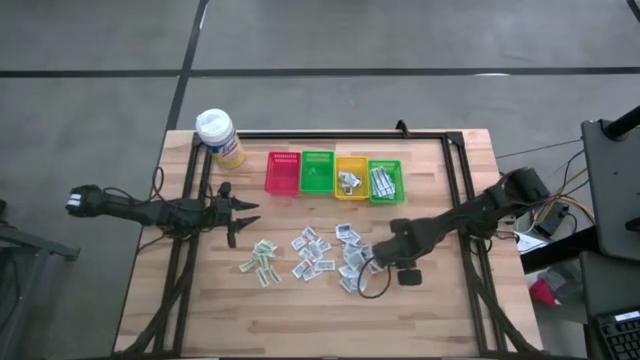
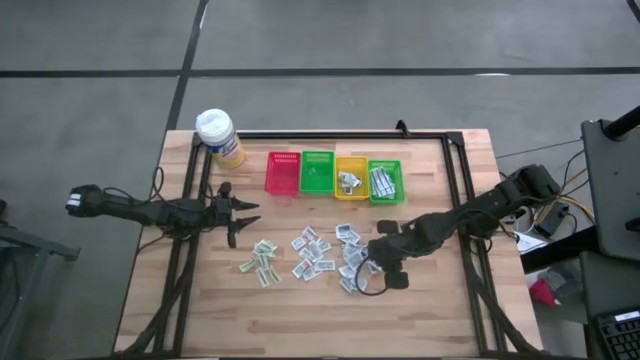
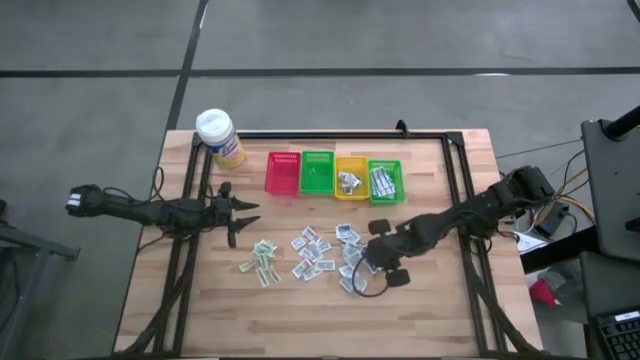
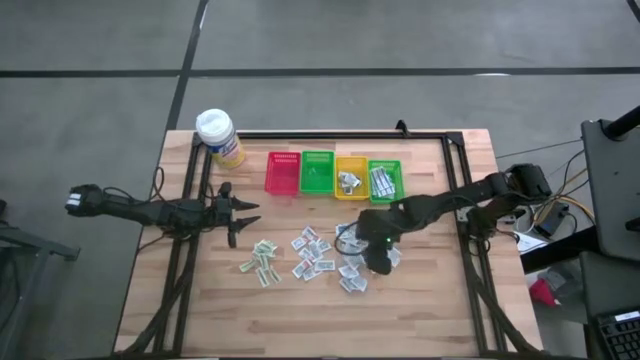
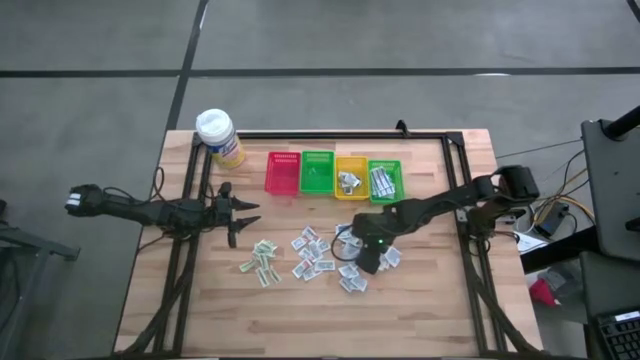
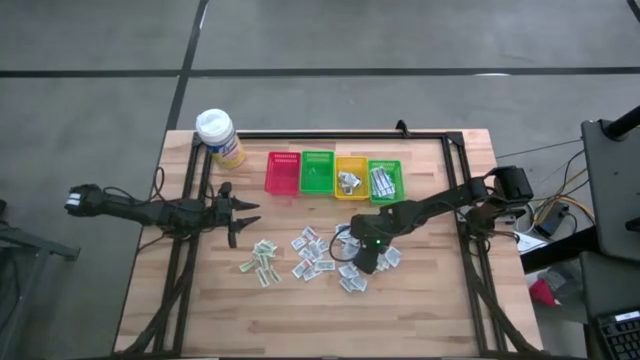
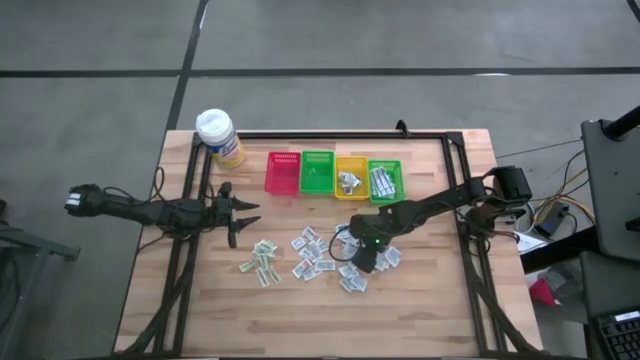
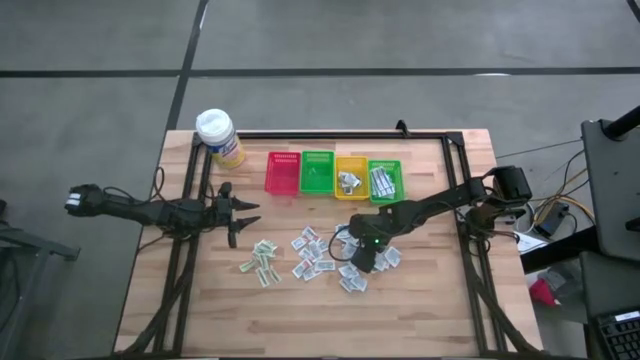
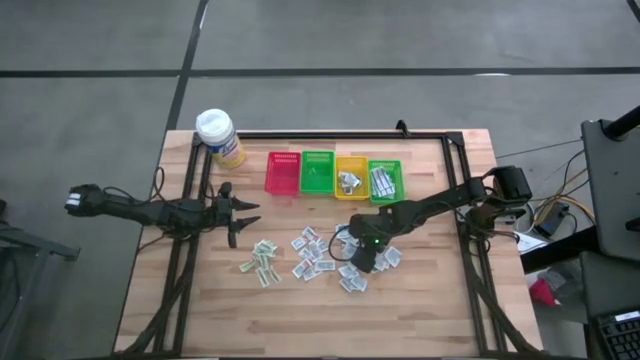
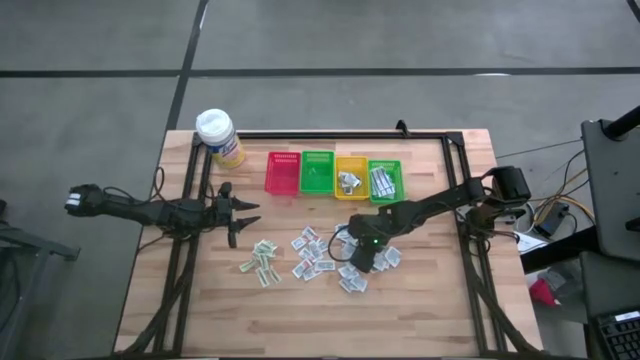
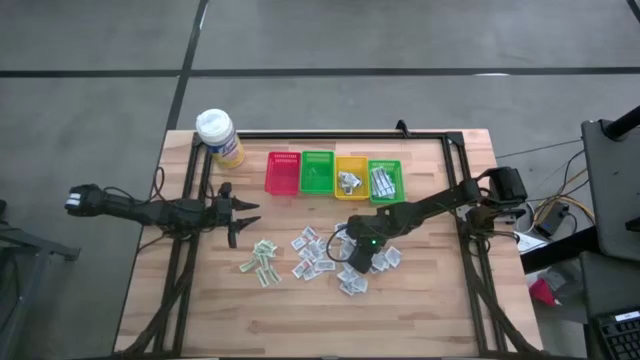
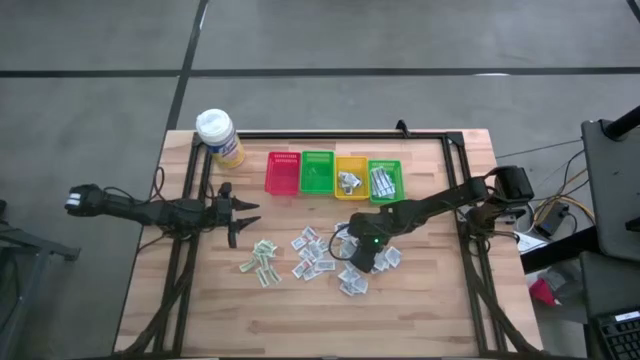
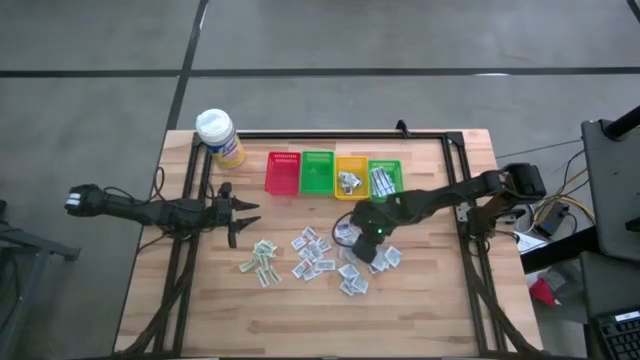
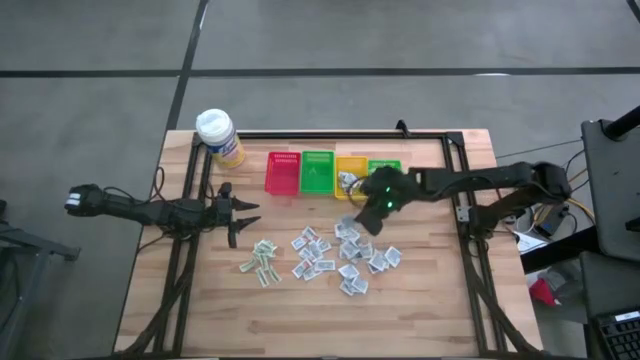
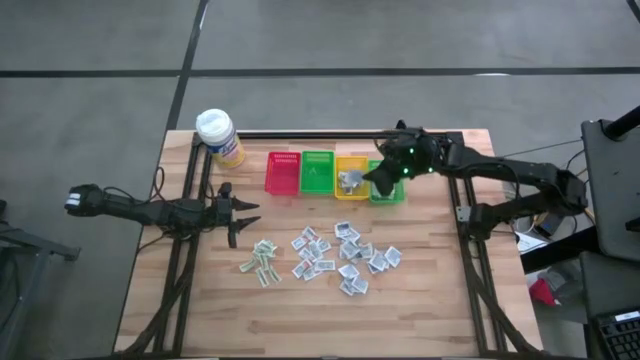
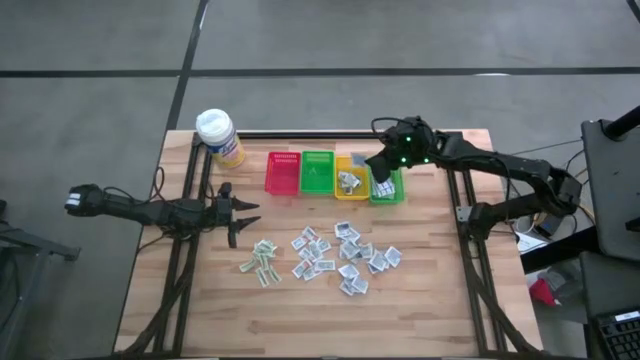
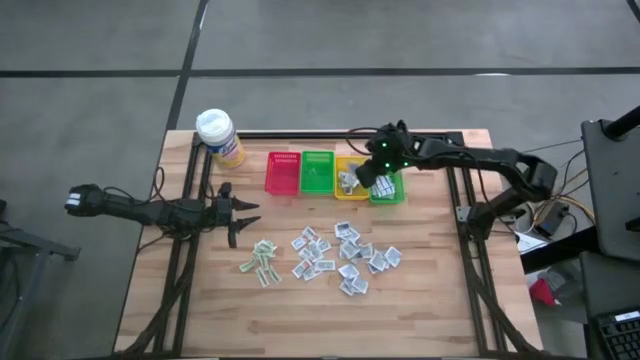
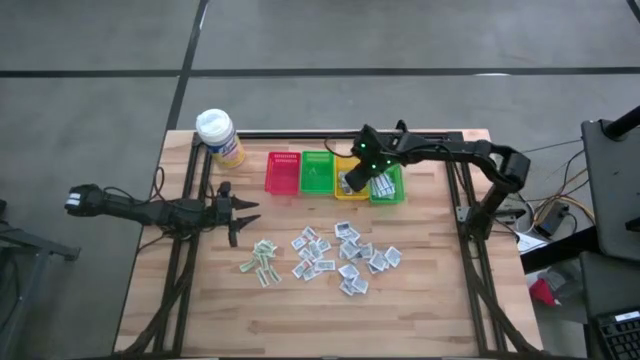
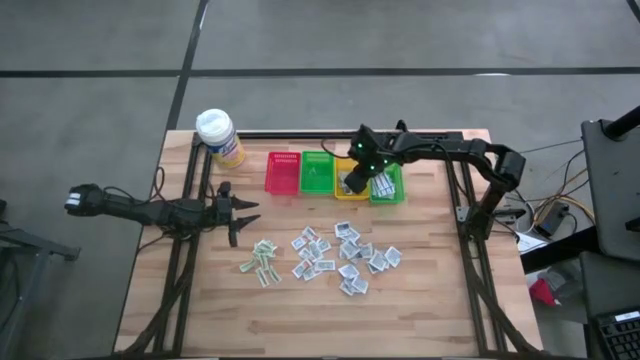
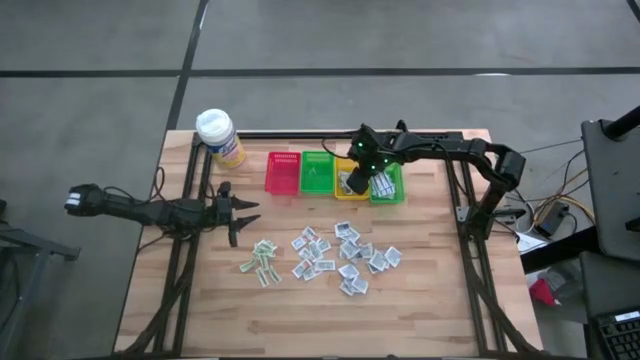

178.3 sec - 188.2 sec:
Task: Pick & Place First Aid Supplies
Put the blue alcohol pad into the yellow bin

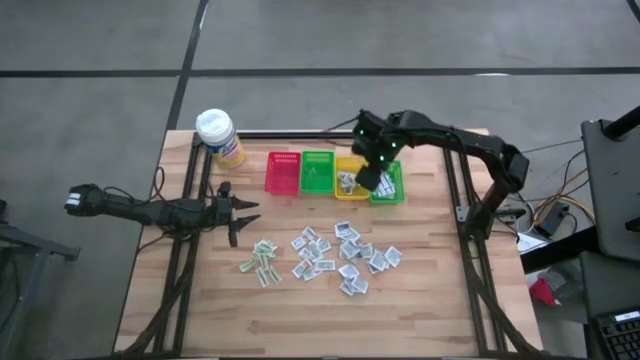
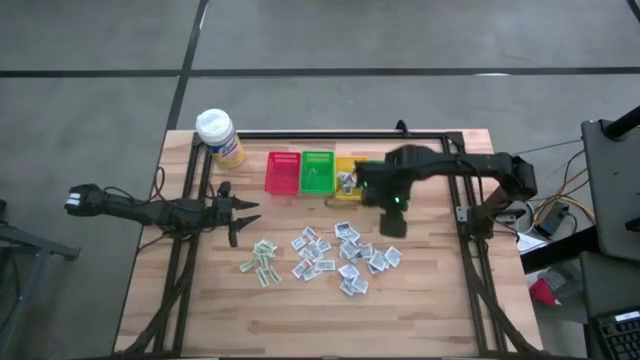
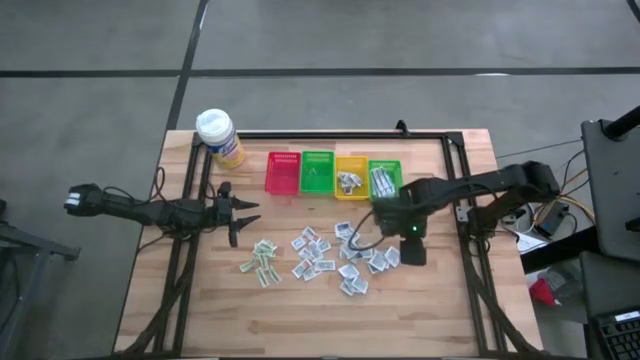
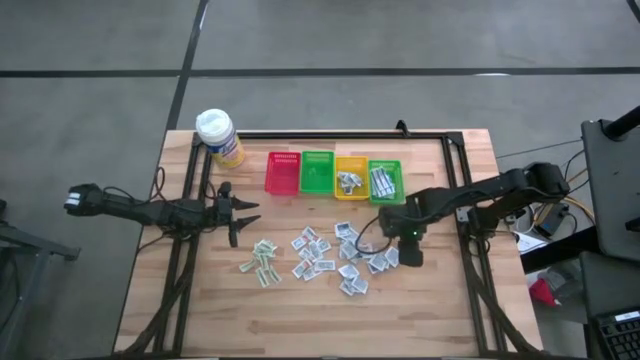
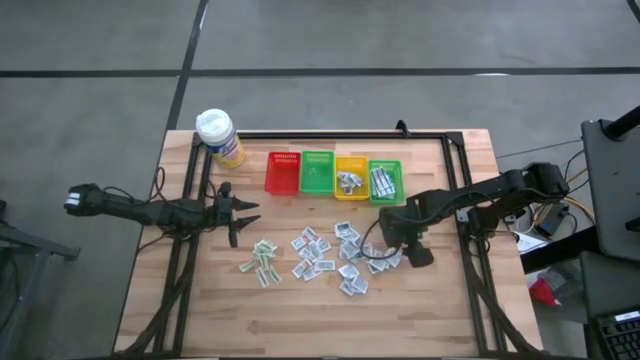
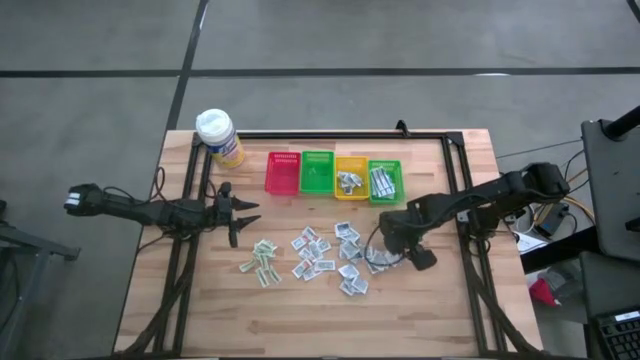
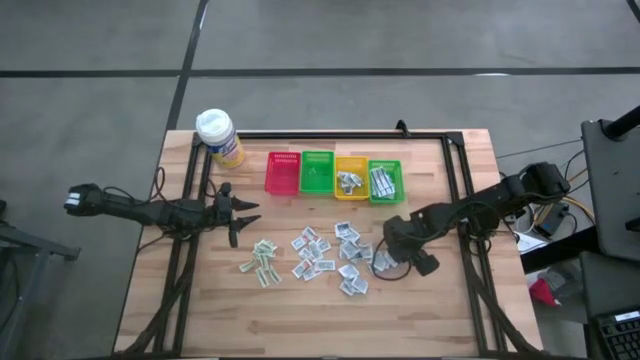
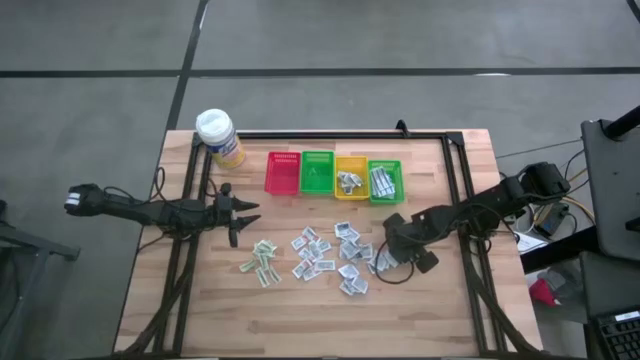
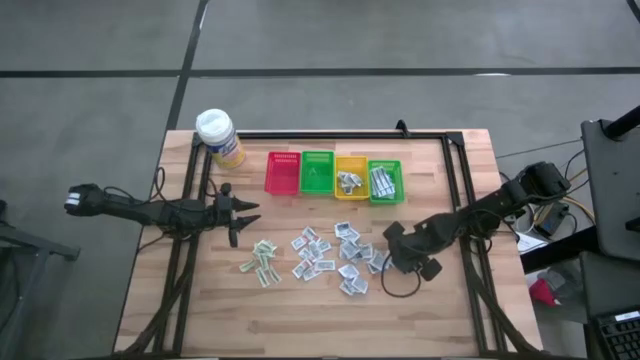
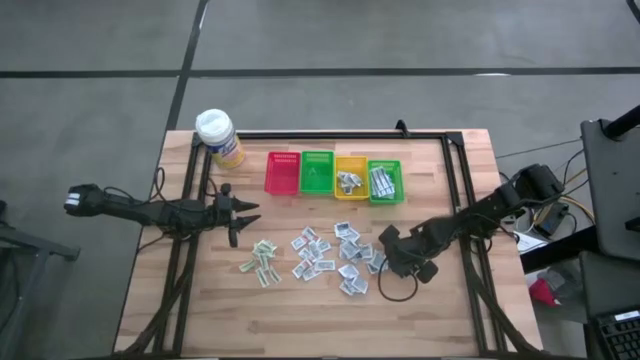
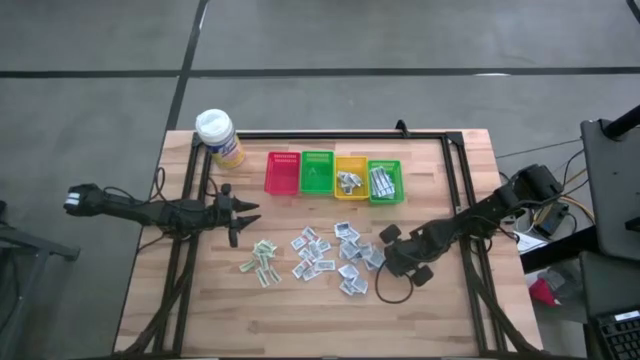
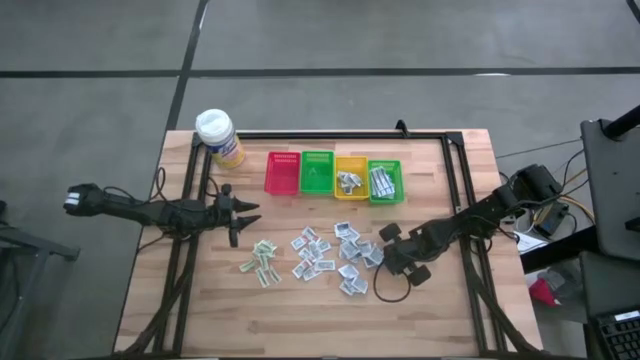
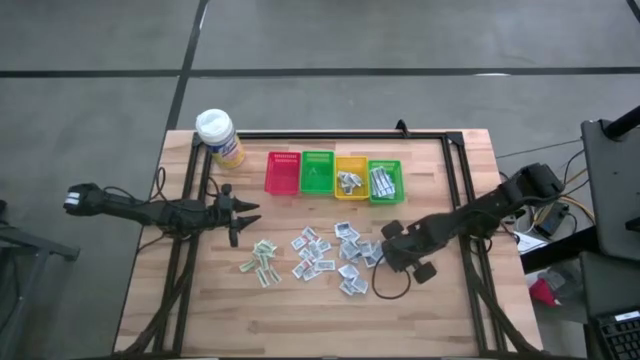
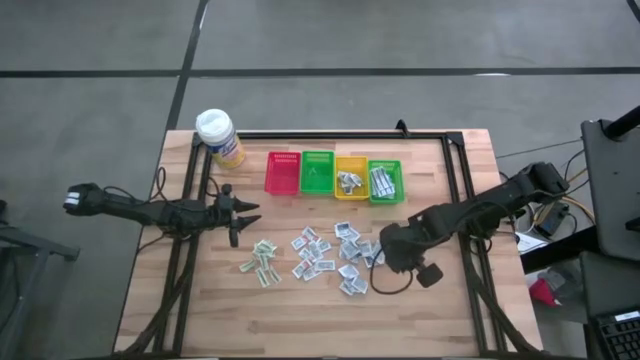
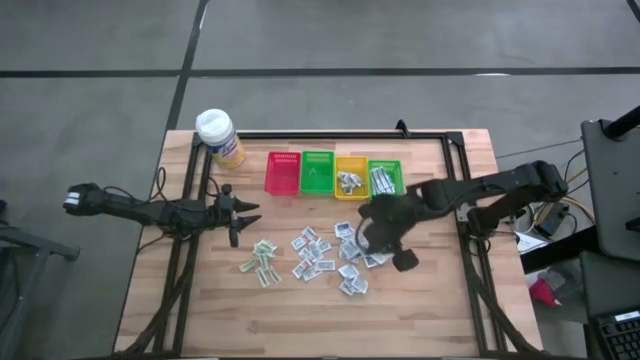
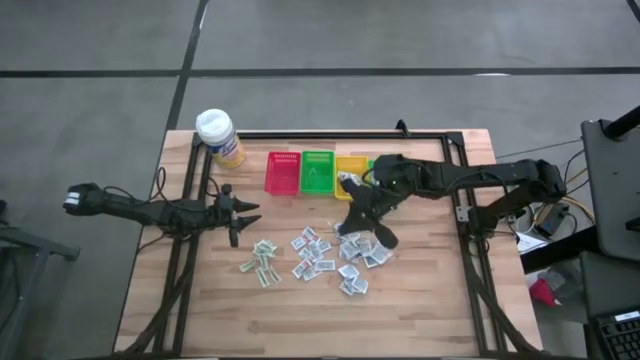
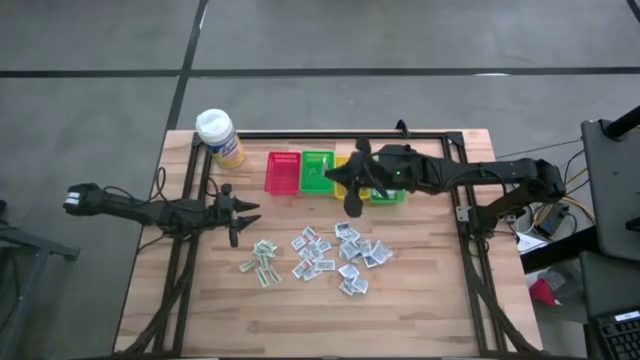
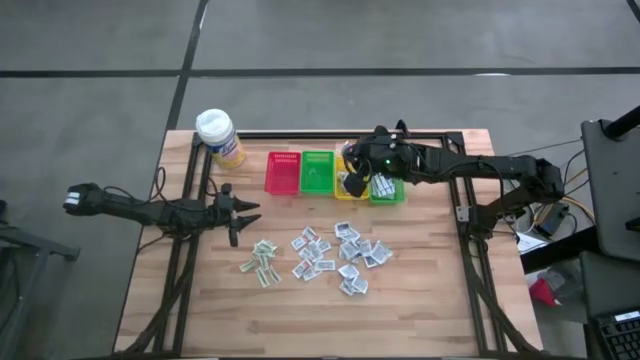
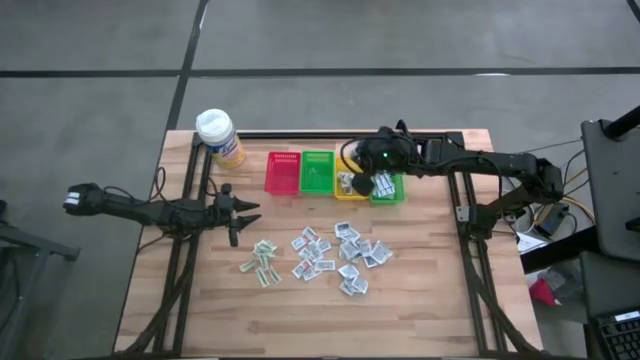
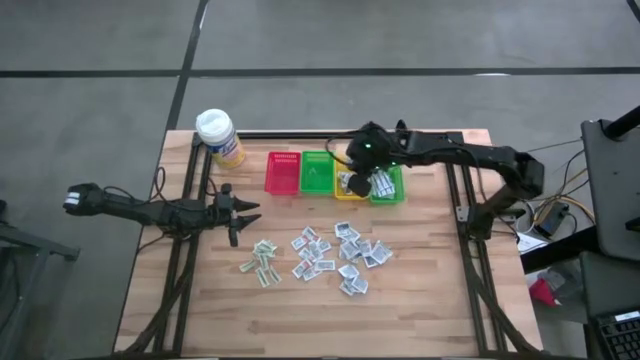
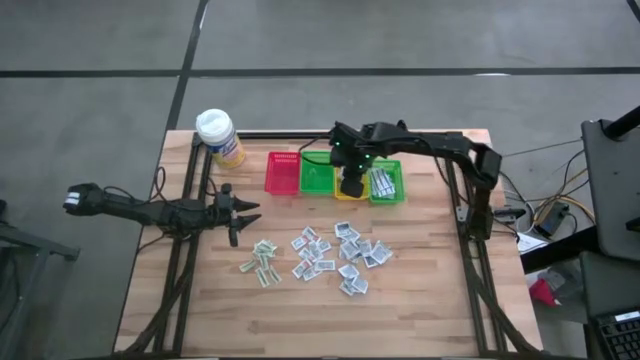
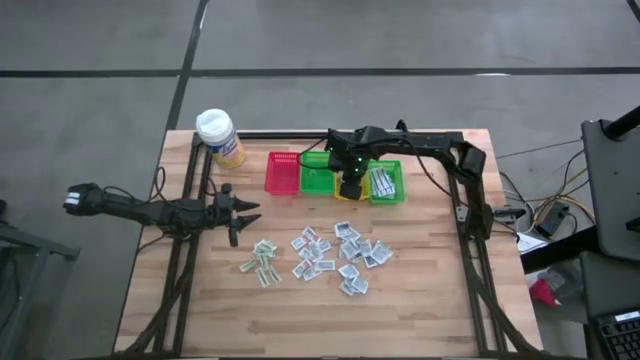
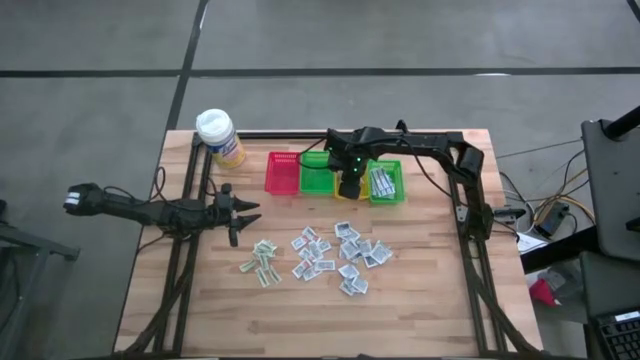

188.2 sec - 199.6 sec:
Put the blue alcohol pad into the yellow bin
